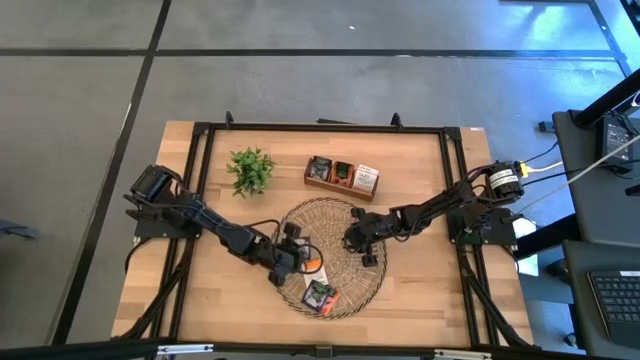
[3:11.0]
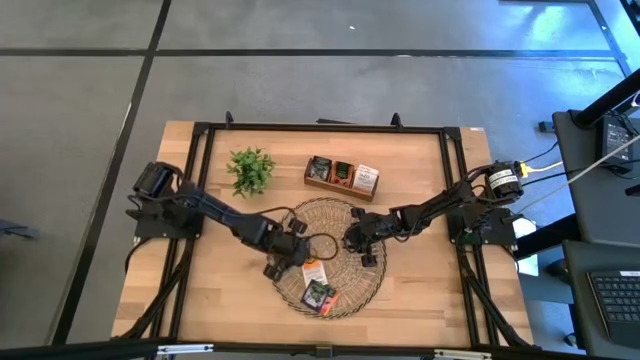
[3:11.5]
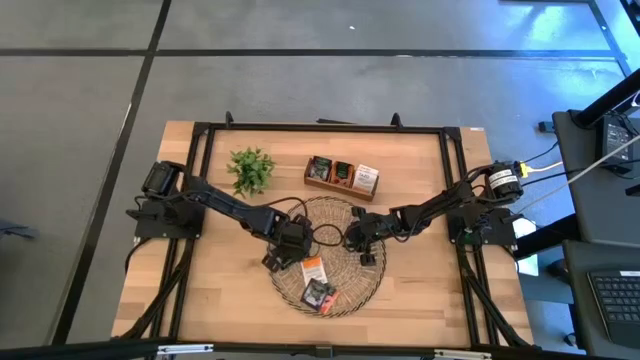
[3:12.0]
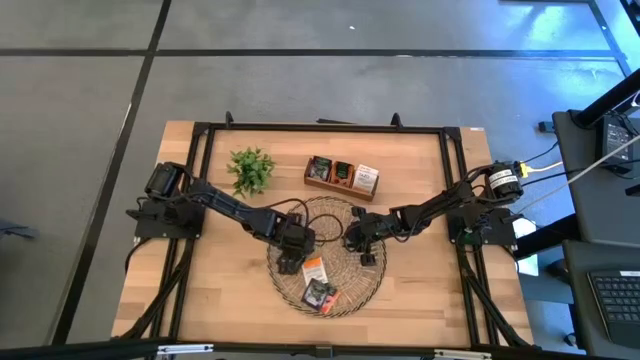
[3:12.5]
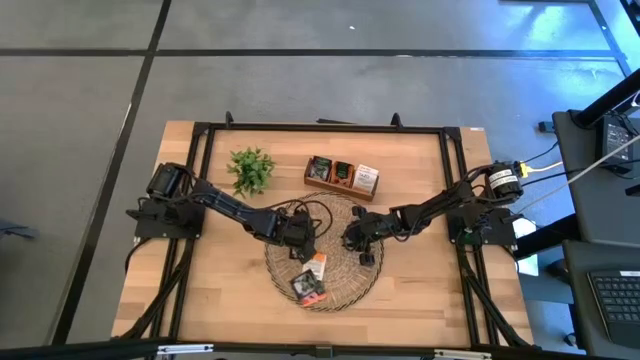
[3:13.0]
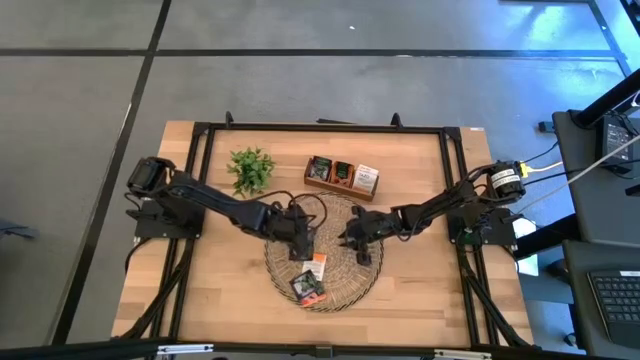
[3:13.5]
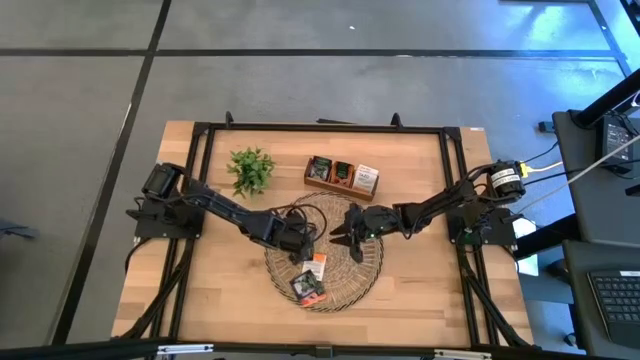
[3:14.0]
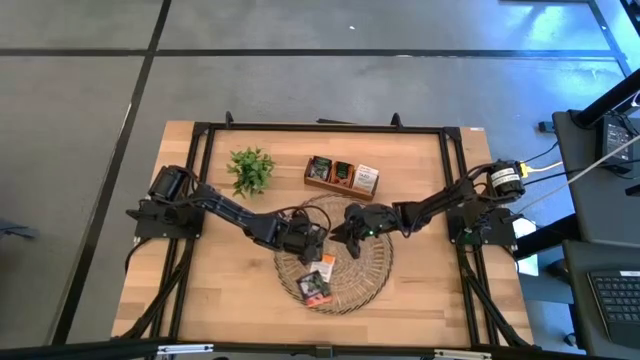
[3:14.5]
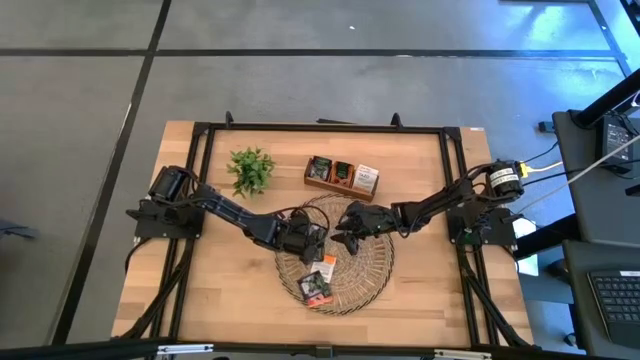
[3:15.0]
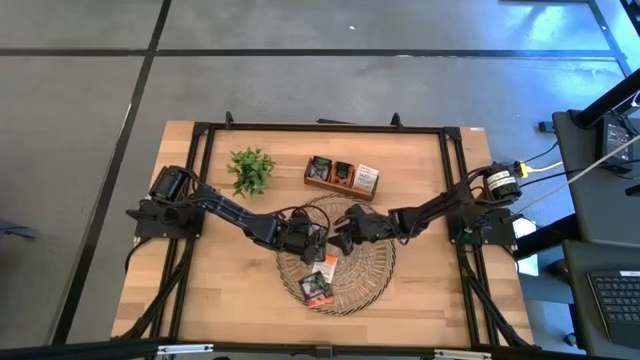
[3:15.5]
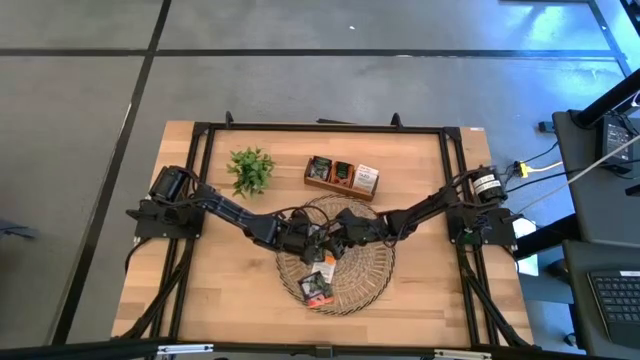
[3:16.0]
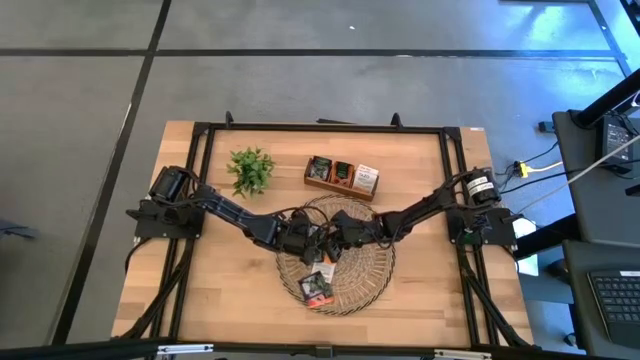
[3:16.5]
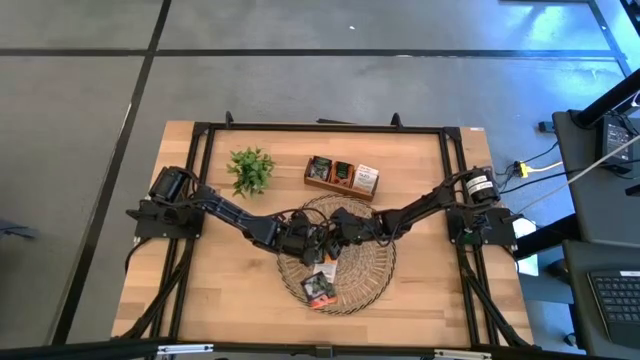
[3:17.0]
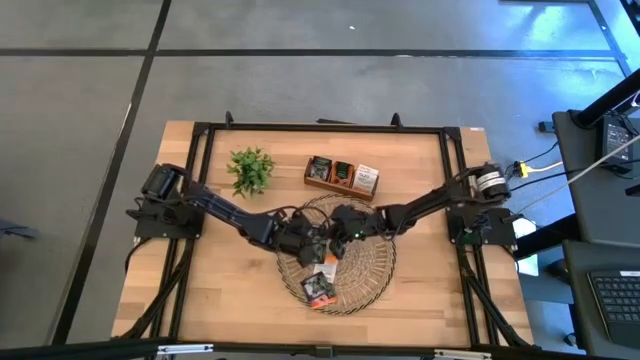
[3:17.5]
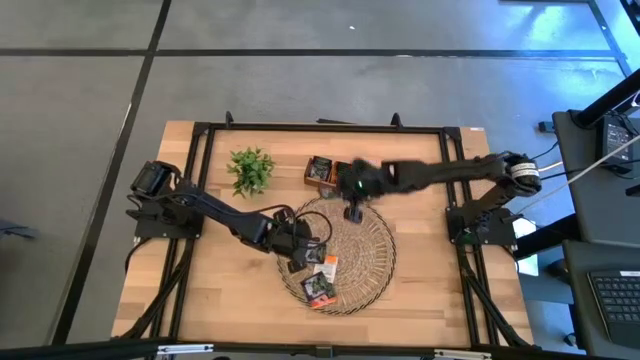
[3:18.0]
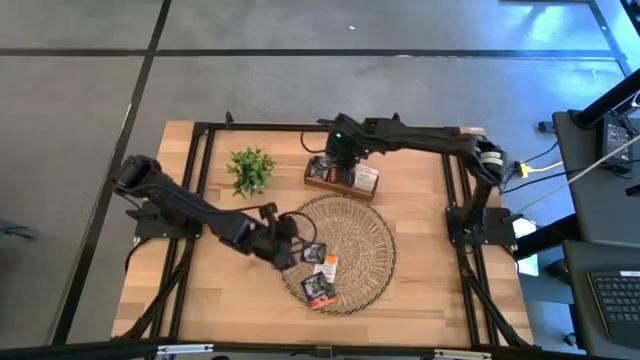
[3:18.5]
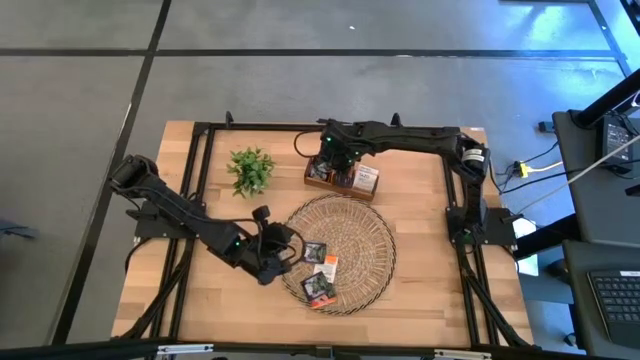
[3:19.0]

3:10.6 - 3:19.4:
Task: Pick & Place Tea
Put the black and white tea bag into the left section of the wooden organizer

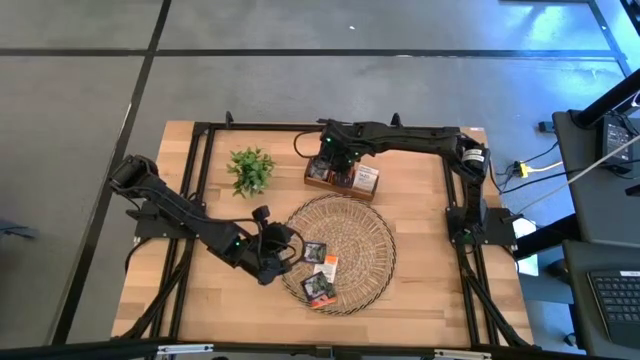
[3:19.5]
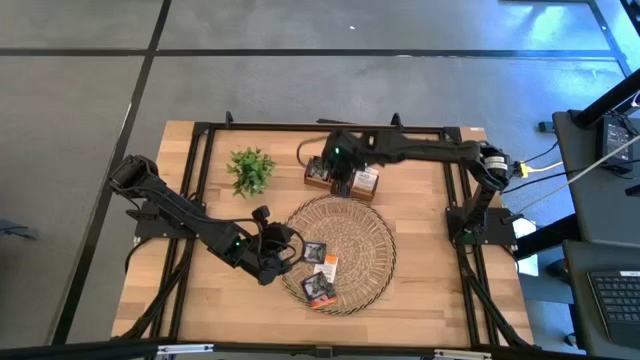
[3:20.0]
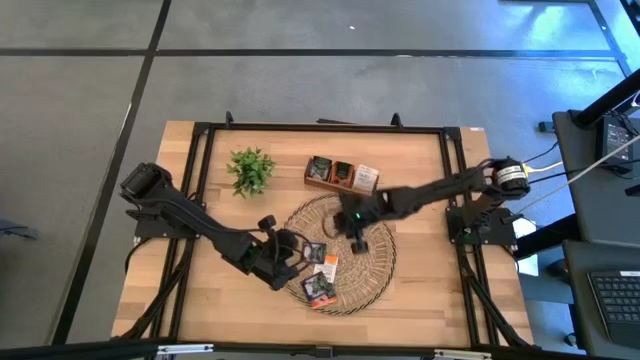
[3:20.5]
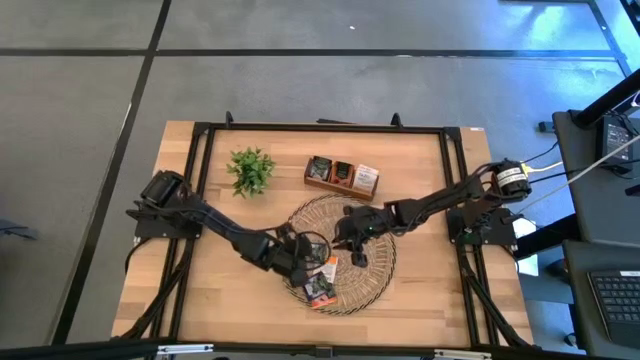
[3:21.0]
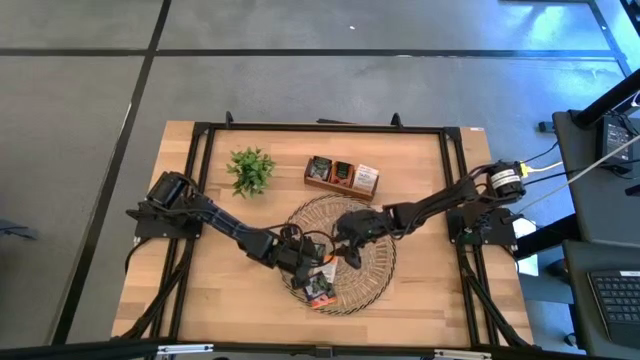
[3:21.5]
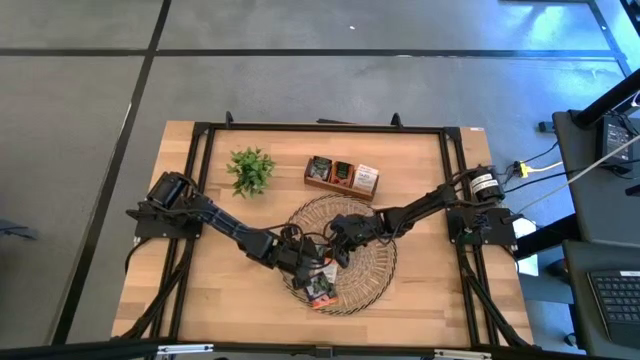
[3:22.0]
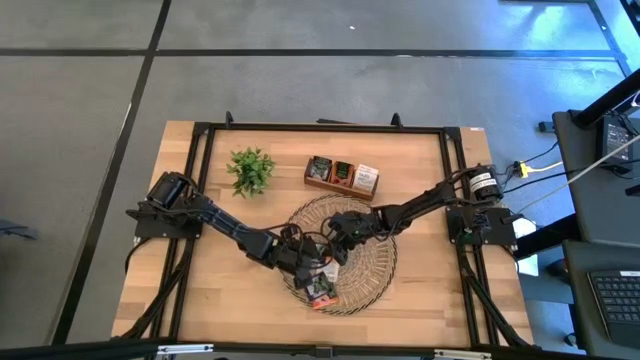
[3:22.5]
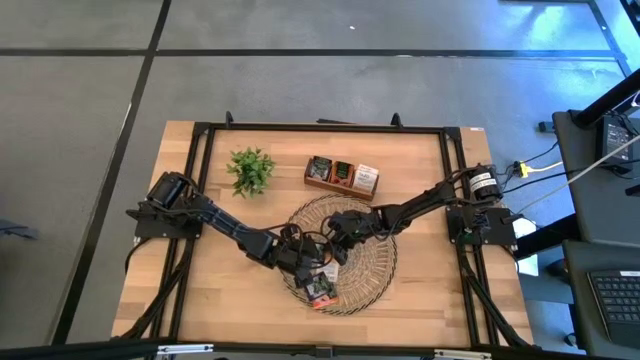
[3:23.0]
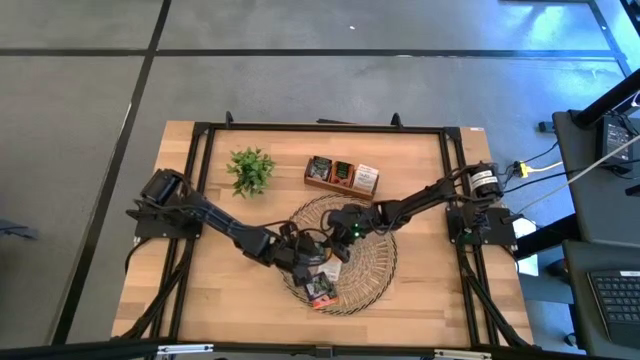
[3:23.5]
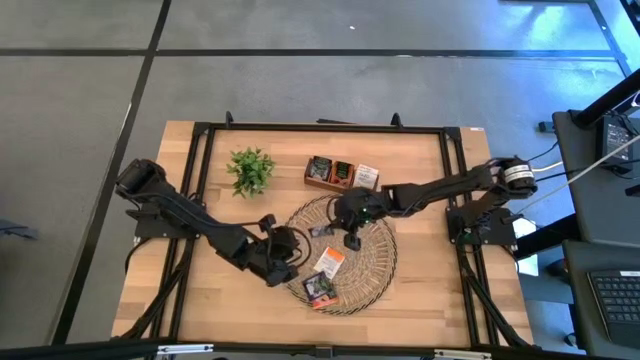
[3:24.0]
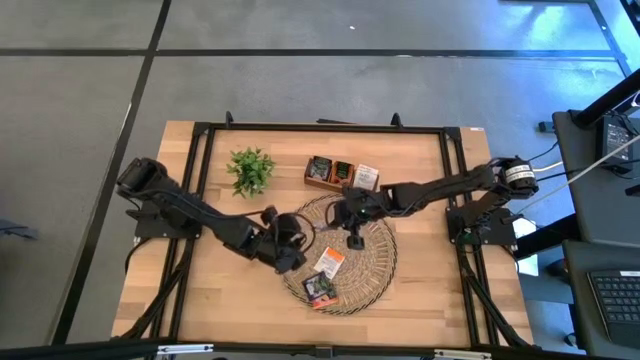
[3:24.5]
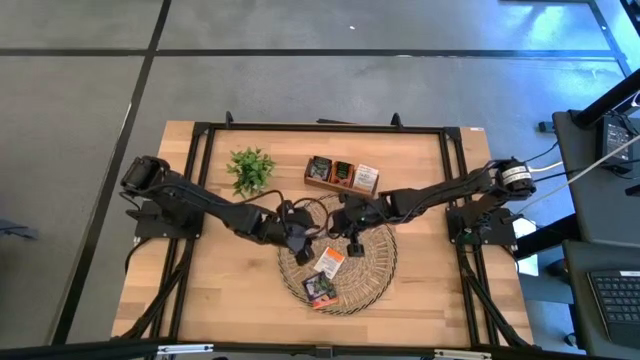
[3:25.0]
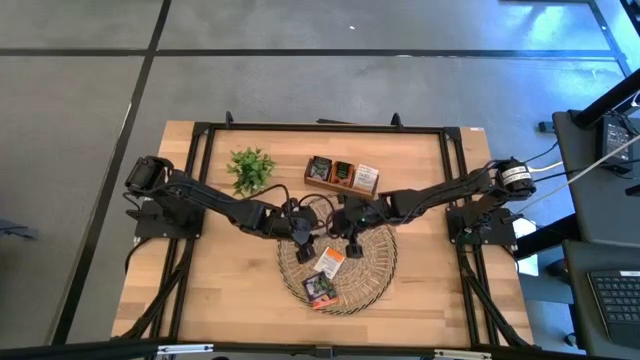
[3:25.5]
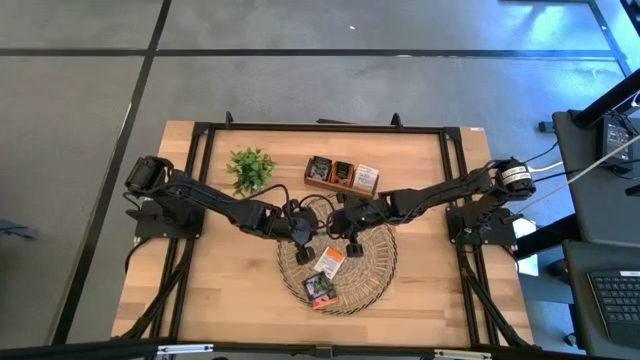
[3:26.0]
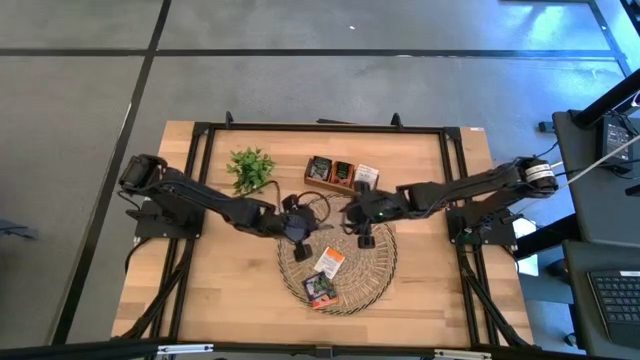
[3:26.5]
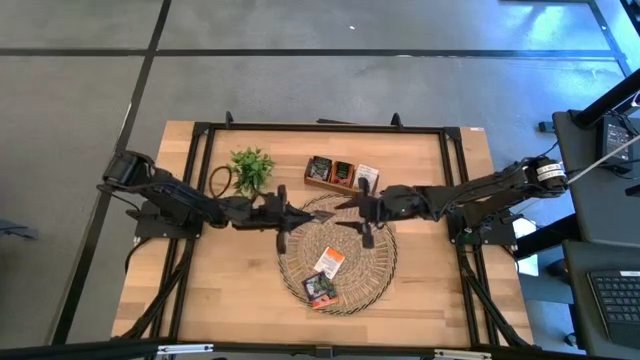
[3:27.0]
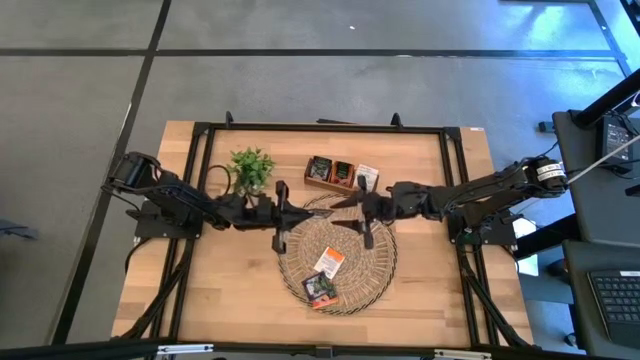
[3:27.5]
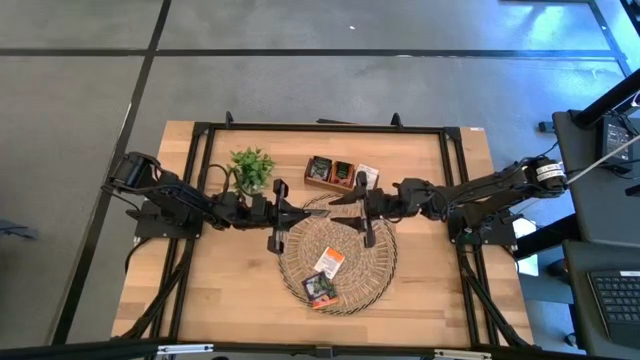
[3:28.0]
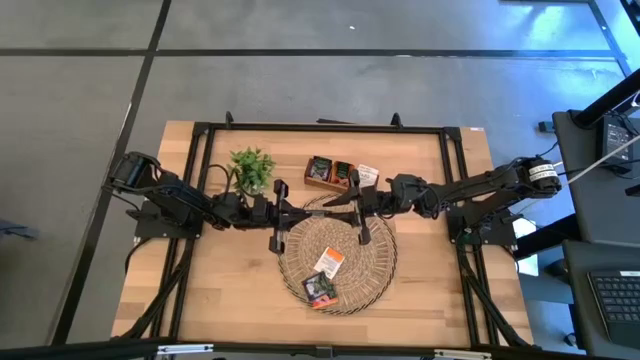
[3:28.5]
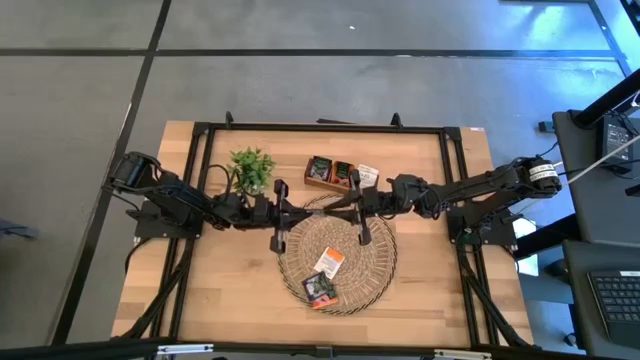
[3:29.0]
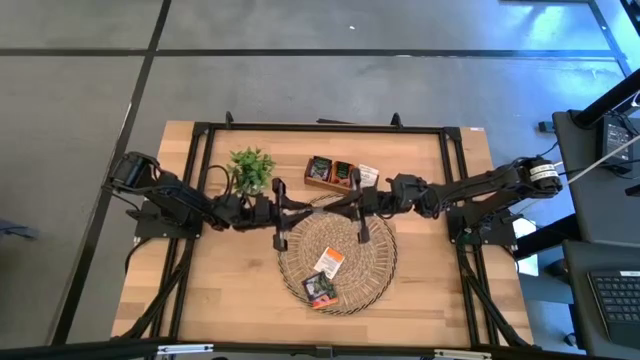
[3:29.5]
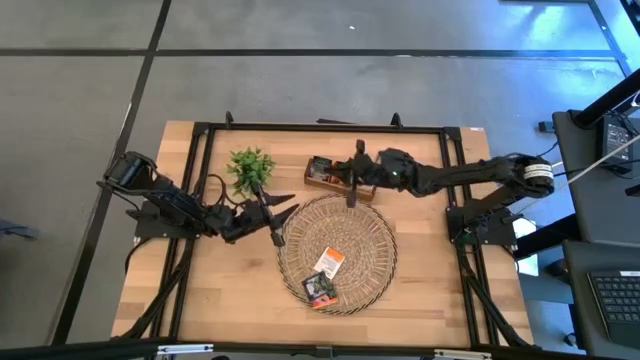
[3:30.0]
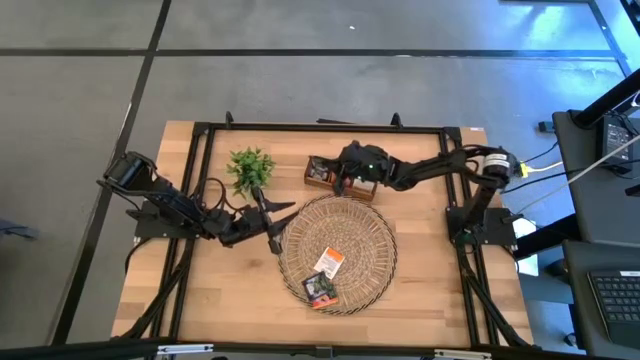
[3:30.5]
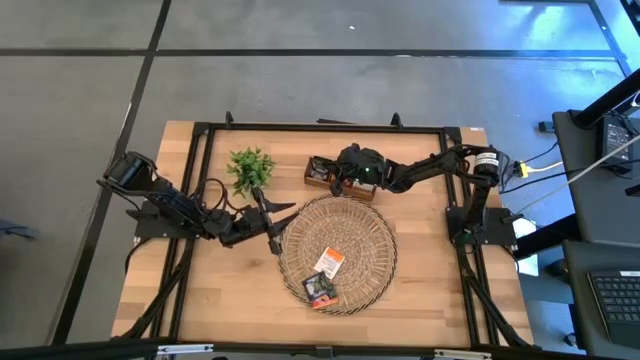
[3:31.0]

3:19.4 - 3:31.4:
Put the black and white tea bag into the left section of the wooden organizer
